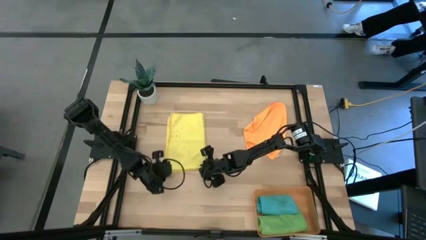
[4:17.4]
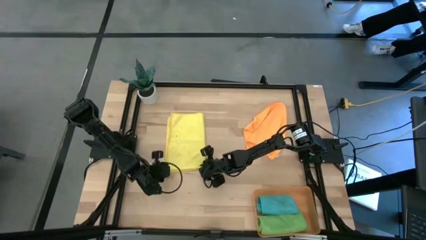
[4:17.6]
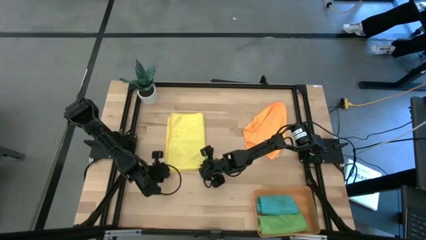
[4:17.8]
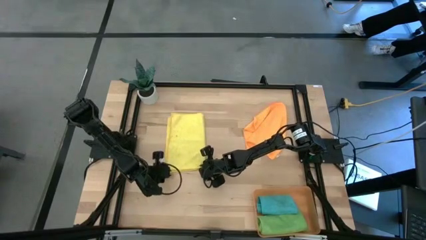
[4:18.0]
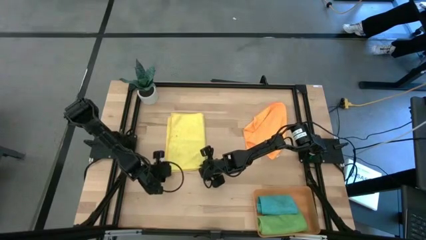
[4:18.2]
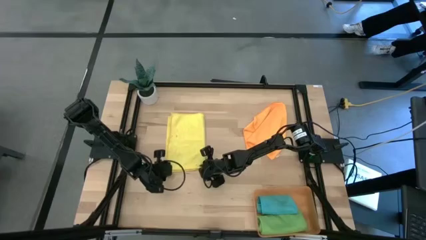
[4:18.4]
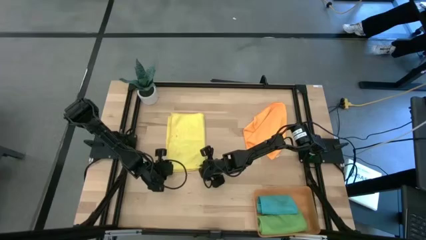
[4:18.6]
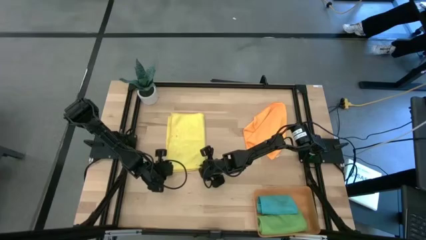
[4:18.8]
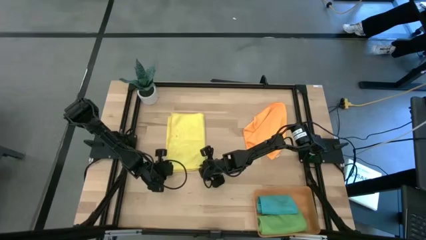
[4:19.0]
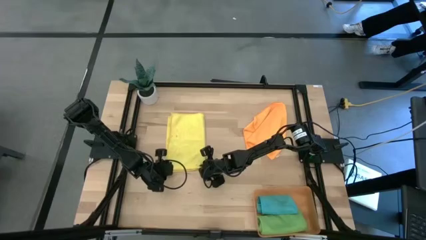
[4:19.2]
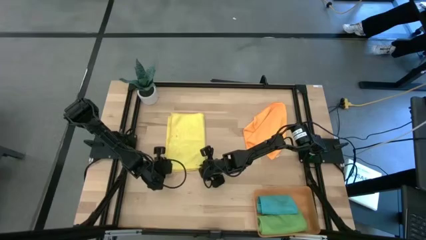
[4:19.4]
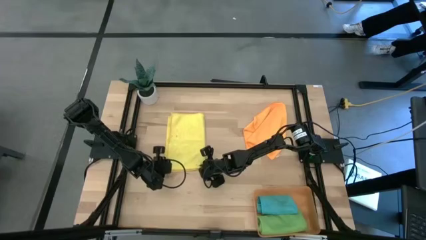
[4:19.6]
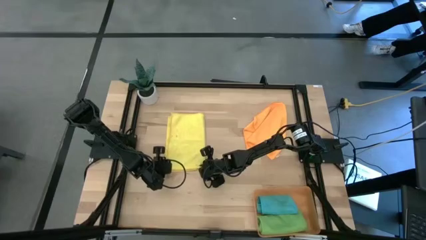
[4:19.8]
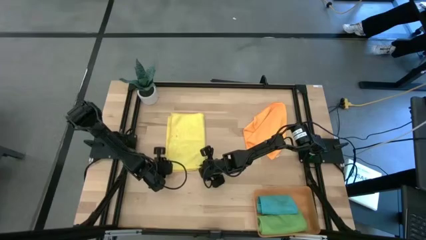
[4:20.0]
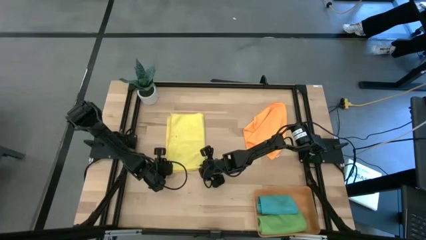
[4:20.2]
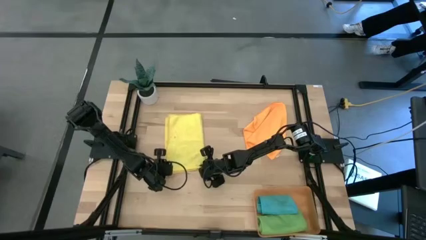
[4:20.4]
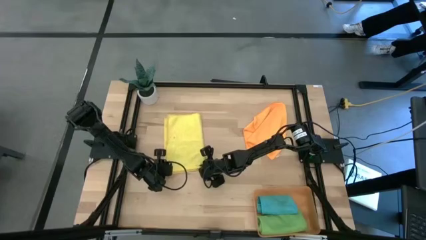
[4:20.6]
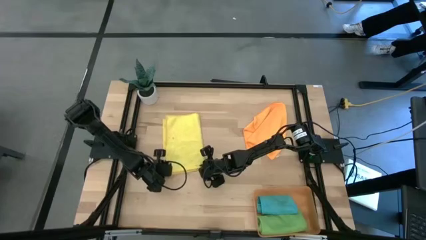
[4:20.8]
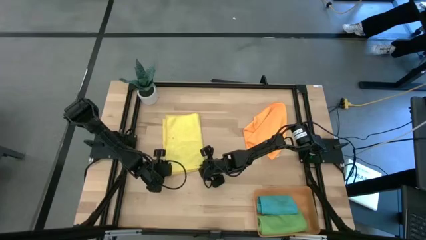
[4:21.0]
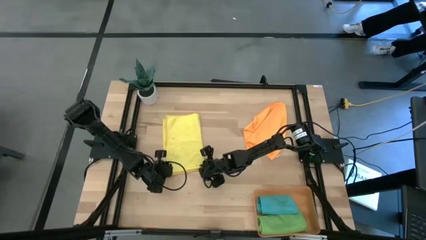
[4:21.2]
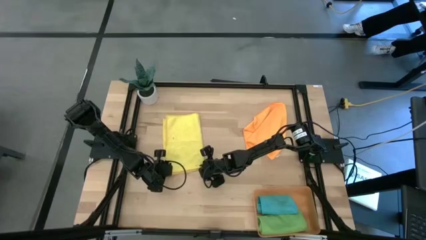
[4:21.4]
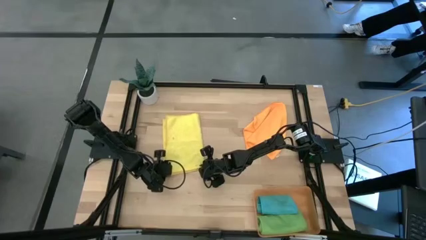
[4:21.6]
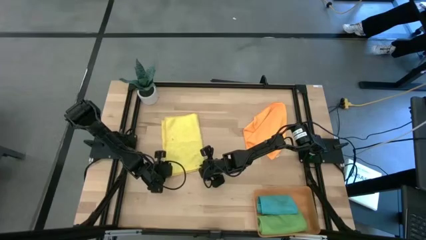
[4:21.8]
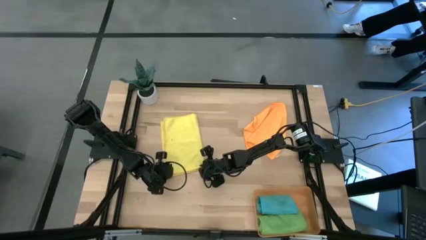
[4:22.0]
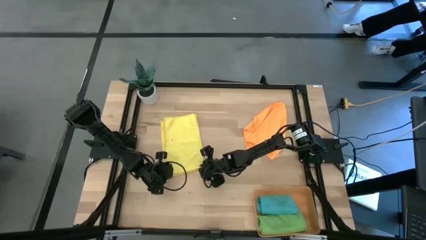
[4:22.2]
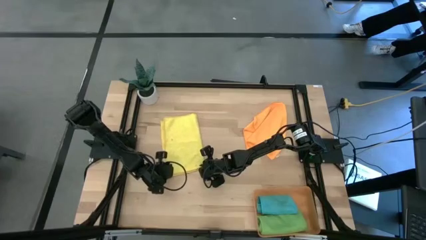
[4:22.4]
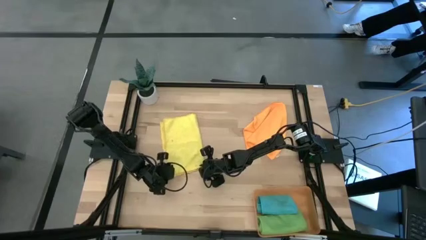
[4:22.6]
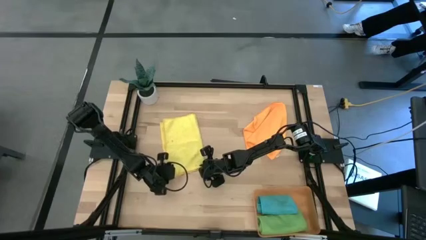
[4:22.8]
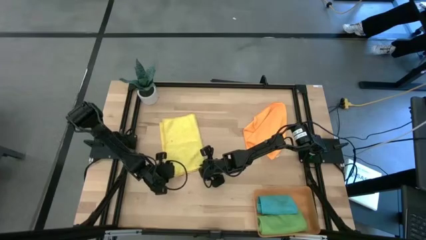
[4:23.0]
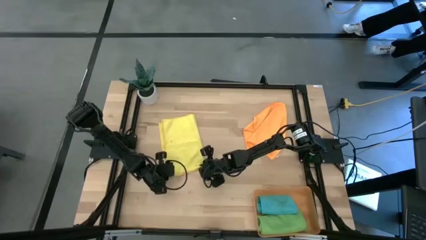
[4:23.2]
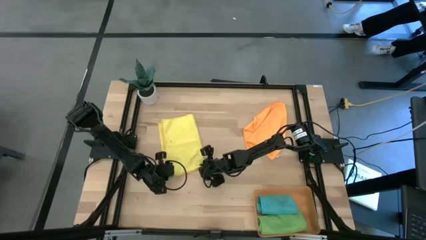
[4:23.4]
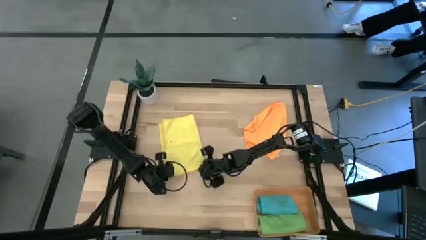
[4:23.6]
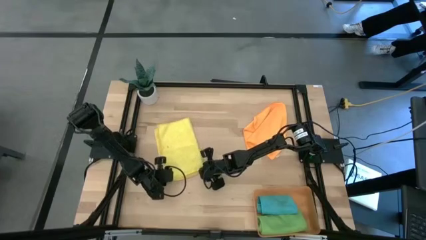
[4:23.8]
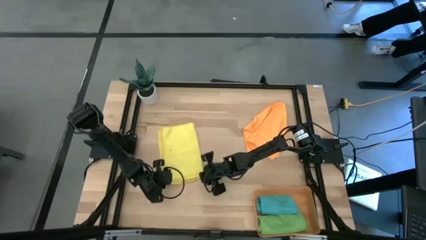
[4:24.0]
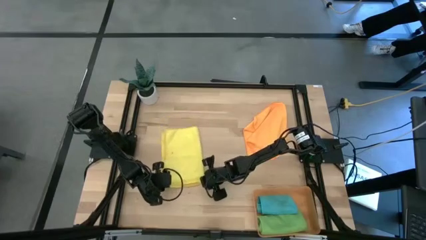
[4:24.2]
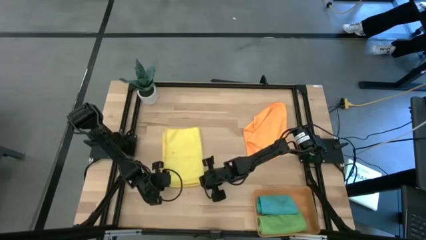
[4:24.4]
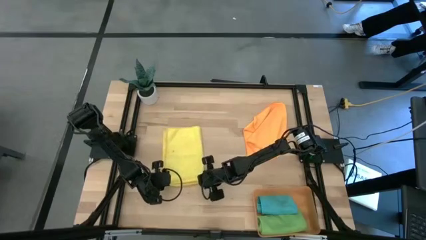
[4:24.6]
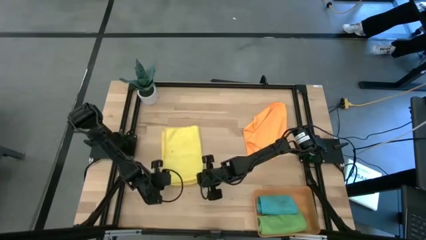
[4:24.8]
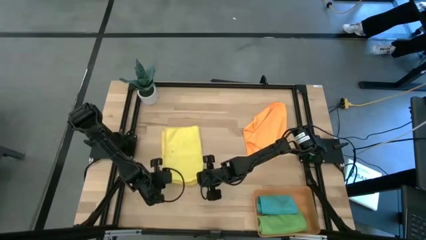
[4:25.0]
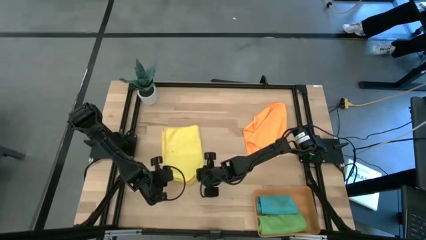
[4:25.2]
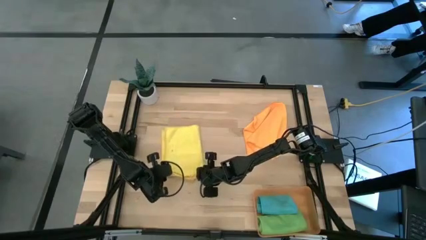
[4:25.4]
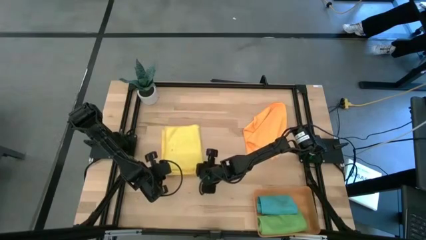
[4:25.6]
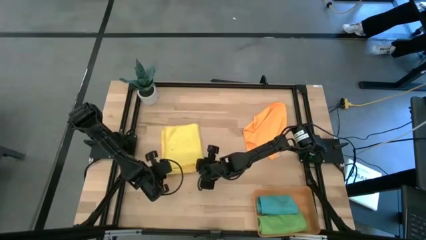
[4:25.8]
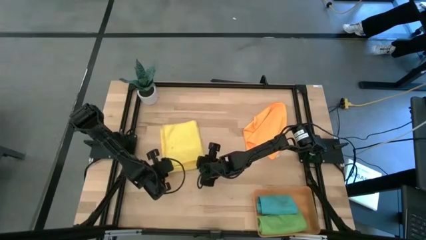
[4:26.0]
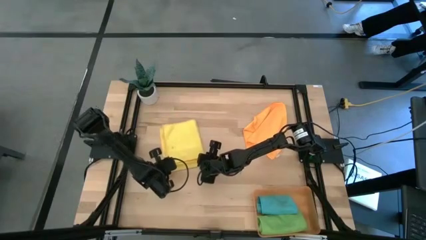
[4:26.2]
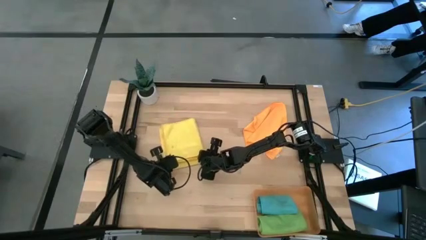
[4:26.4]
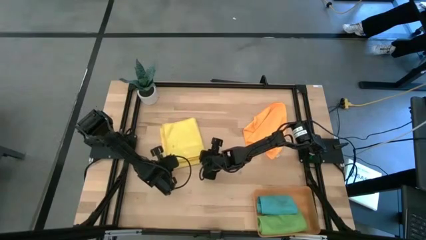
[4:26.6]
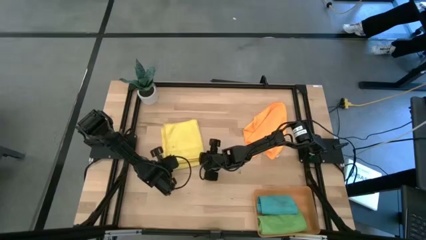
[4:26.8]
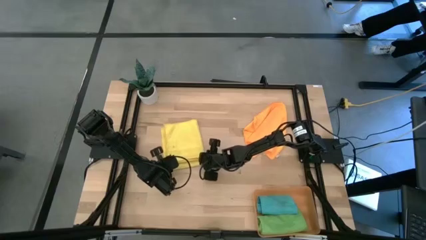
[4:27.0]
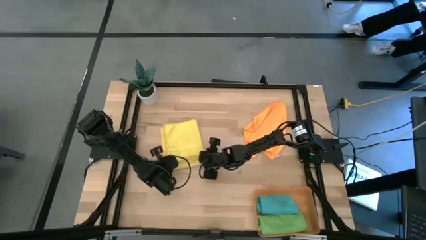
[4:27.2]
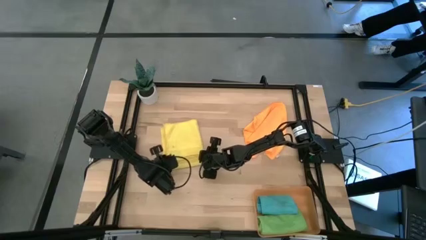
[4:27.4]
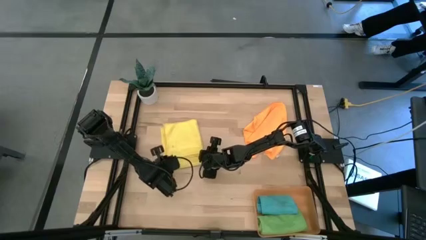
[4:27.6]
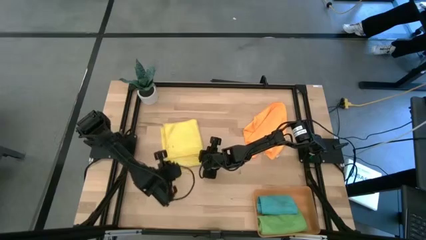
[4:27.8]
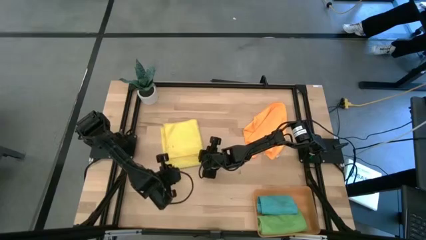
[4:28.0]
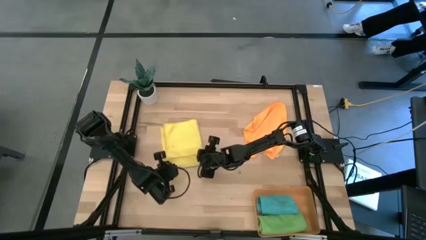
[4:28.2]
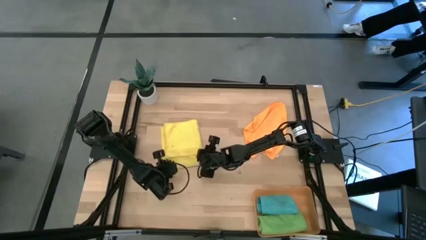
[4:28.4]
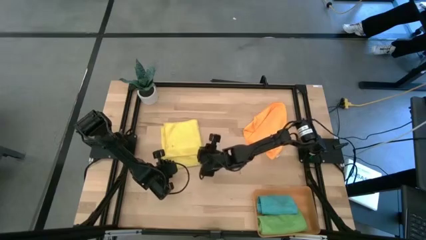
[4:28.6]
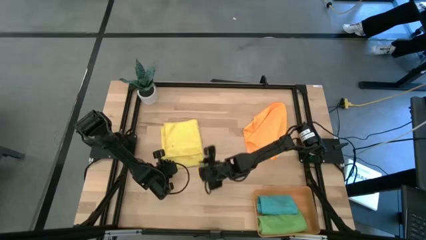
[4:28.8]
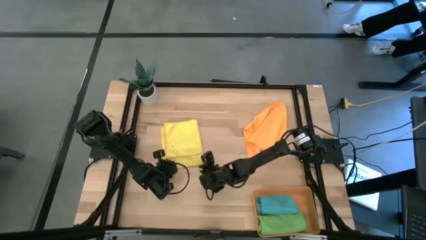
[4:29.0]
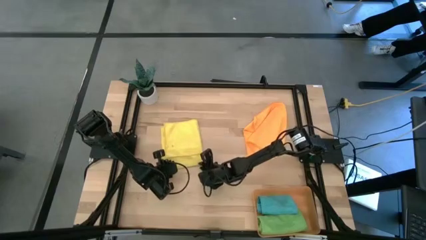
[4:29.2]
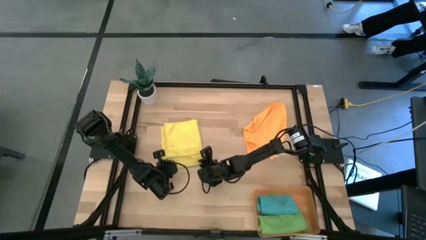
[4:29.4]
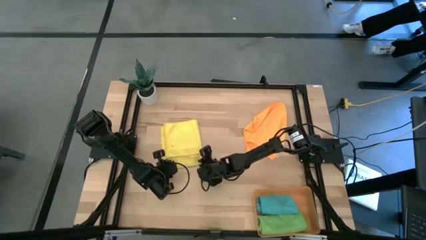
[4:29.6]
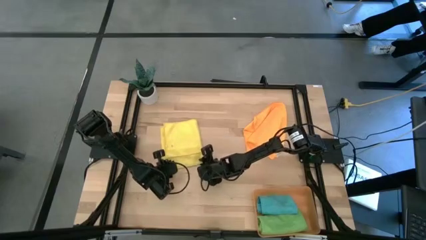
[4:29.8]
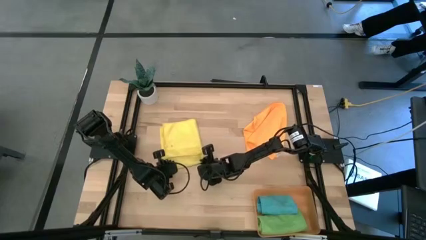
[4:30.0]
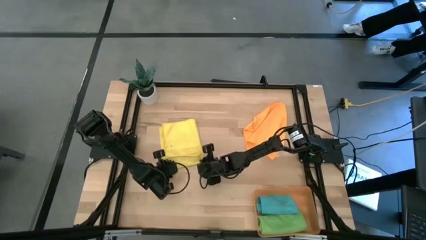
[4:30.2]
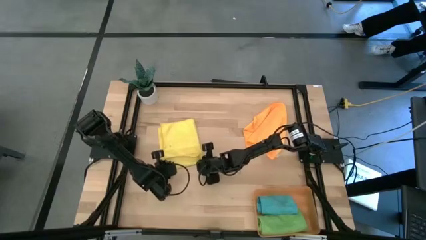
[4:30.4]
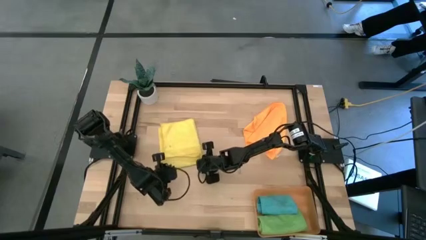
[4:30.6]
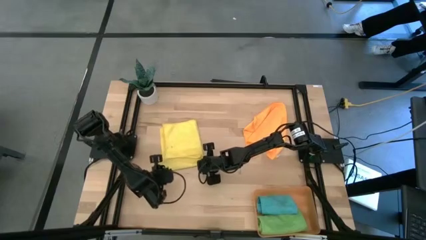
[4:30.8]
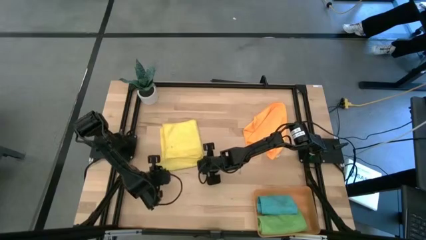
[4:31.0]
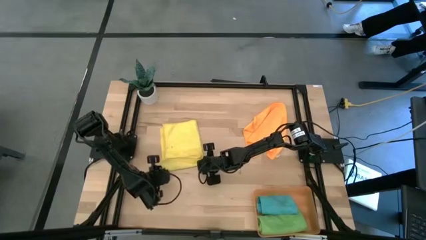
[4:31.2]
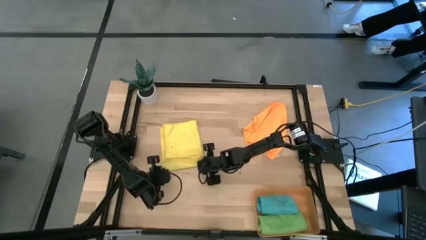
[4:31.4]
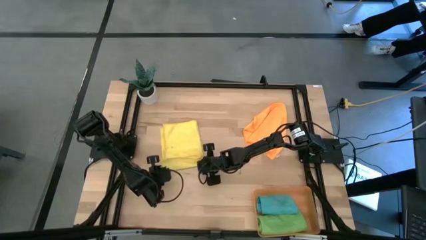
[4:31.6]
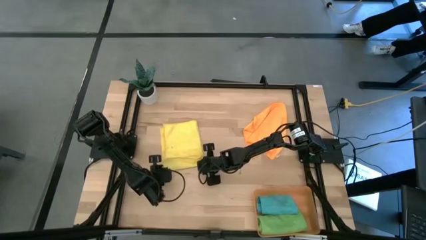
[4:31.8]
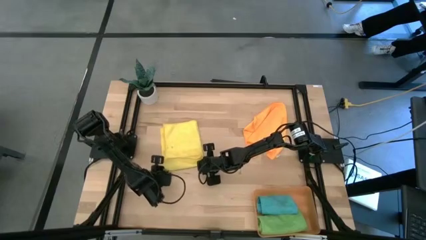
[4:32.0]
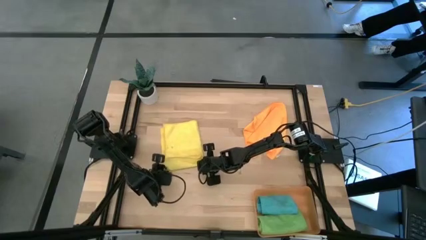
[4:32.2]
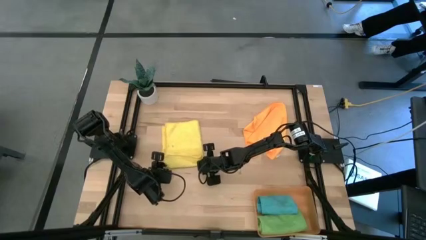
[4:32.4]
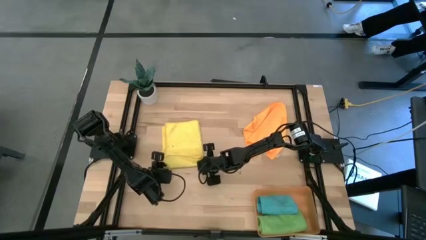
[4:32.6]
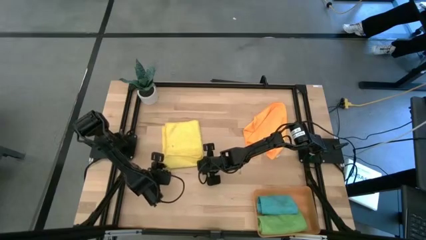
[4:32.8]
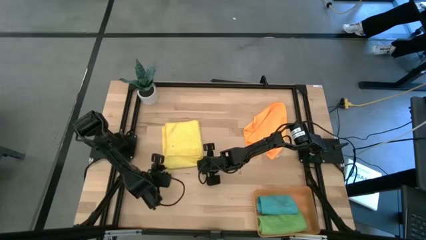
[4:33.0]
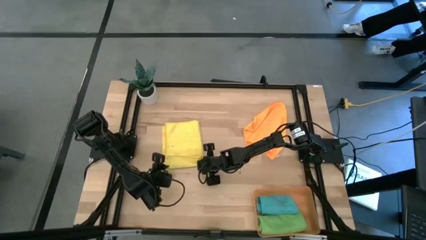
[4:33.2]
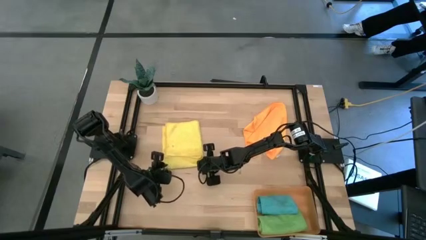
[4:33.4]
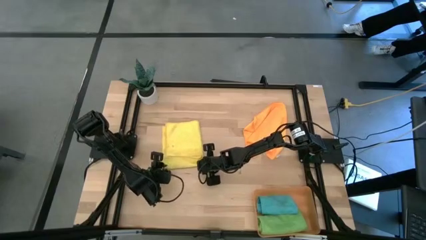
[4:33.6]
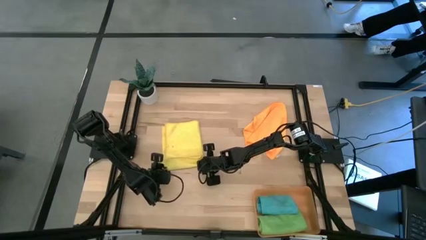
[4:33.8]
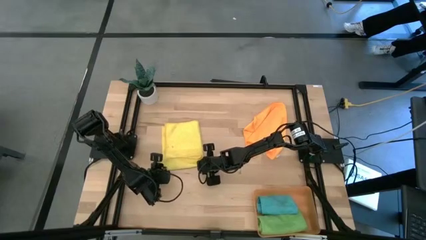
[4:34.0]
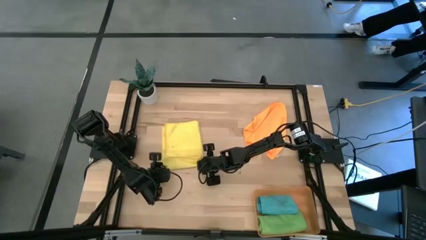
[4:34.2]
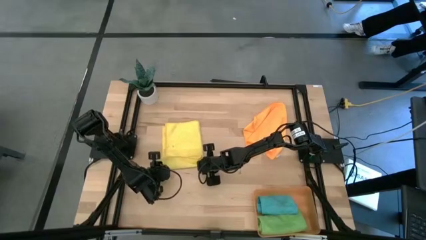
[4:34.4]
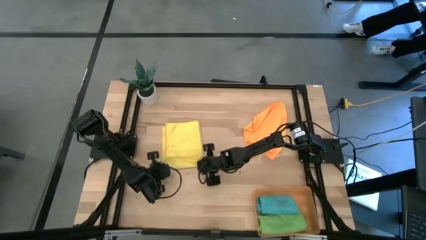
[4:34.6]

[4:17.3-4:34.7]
Task: Roll microfiber towels into tight, uniform cylinder then place into a basket
Roll the yellow microfiber towel
